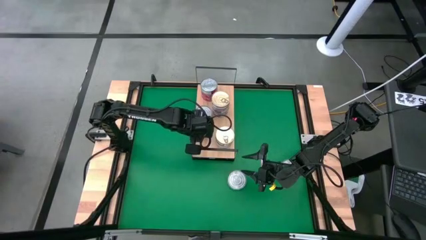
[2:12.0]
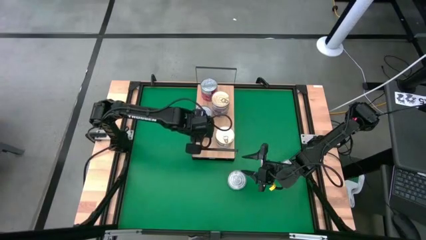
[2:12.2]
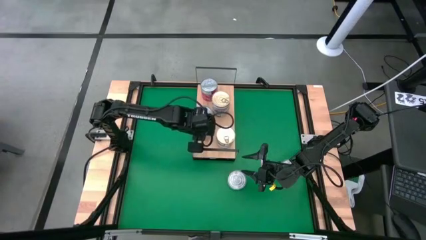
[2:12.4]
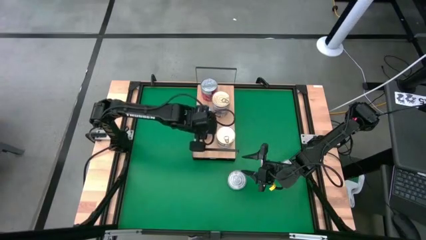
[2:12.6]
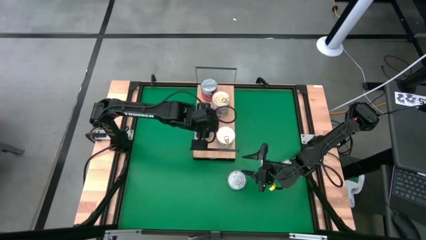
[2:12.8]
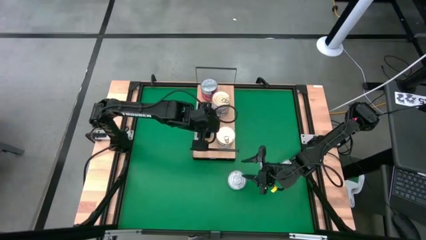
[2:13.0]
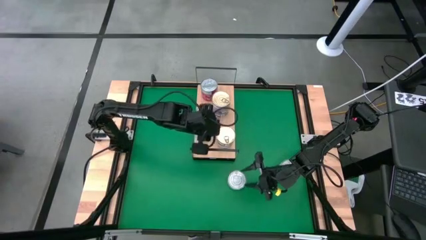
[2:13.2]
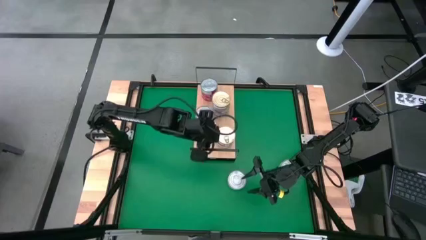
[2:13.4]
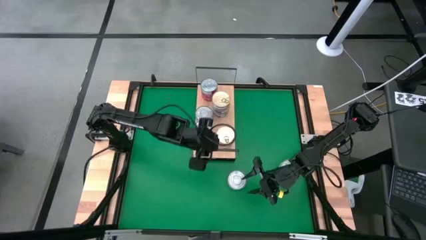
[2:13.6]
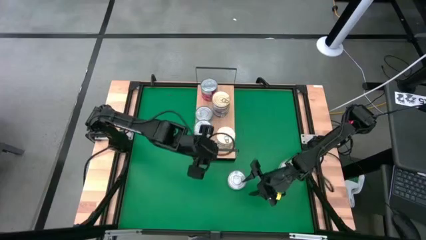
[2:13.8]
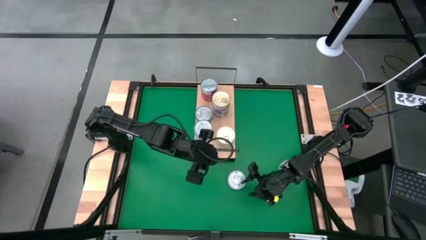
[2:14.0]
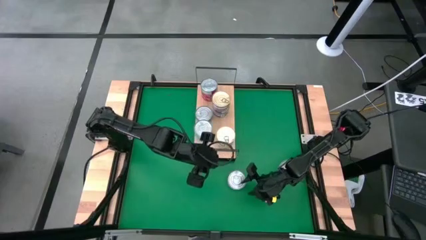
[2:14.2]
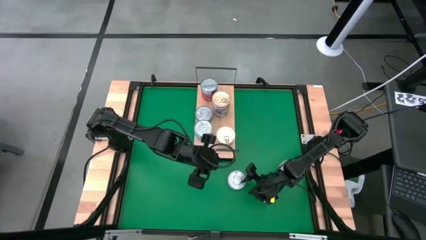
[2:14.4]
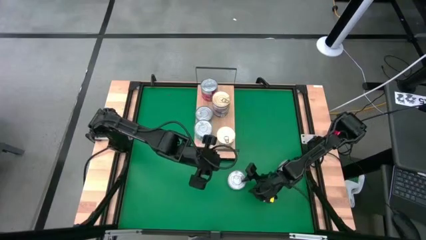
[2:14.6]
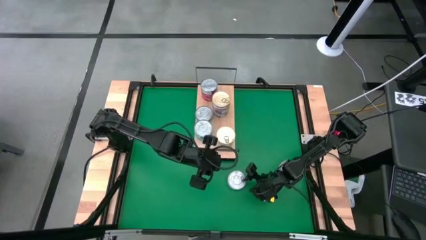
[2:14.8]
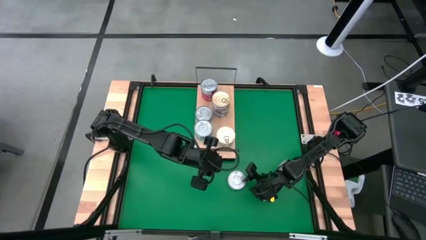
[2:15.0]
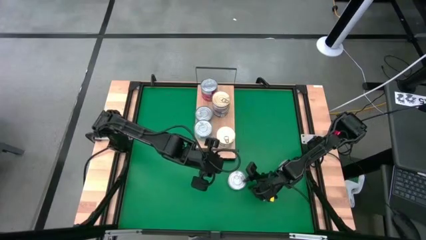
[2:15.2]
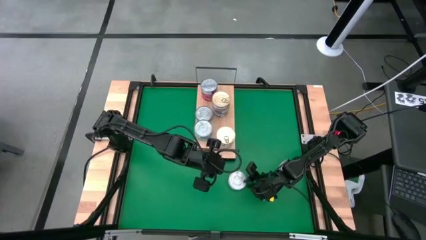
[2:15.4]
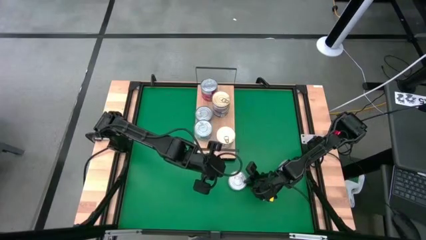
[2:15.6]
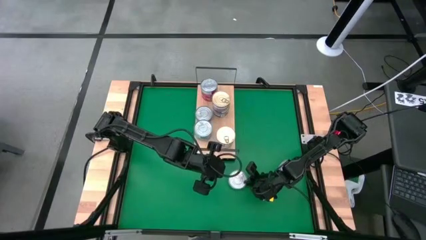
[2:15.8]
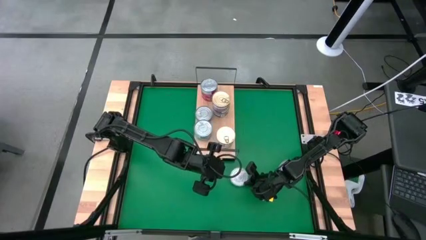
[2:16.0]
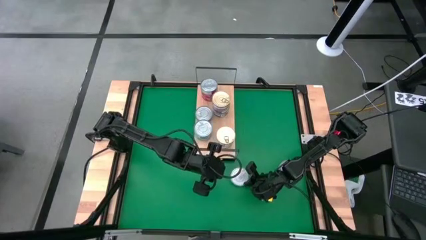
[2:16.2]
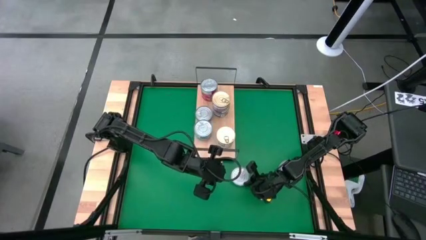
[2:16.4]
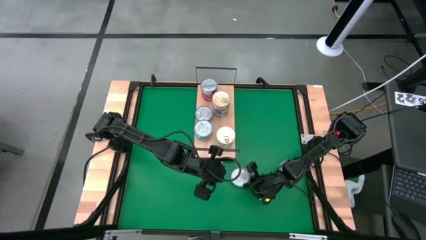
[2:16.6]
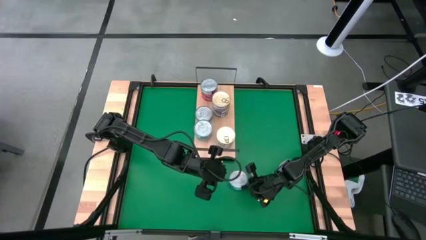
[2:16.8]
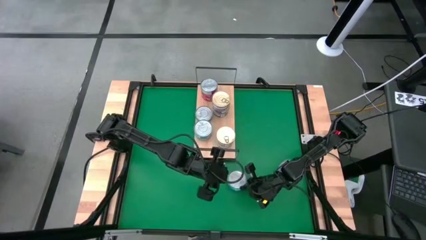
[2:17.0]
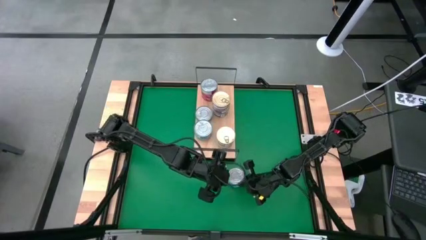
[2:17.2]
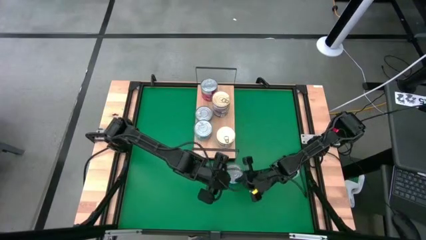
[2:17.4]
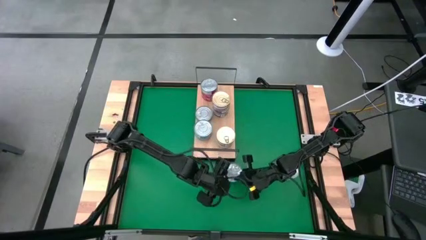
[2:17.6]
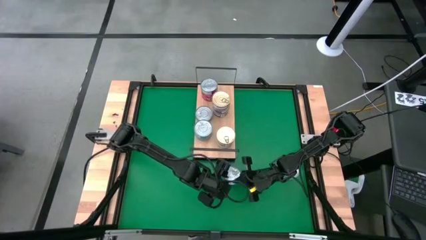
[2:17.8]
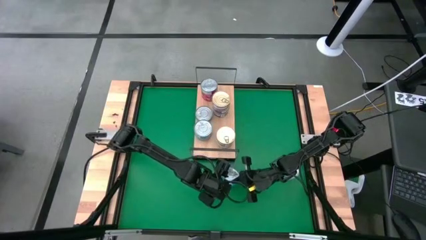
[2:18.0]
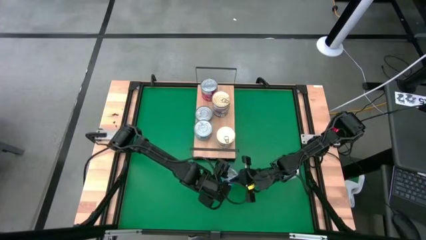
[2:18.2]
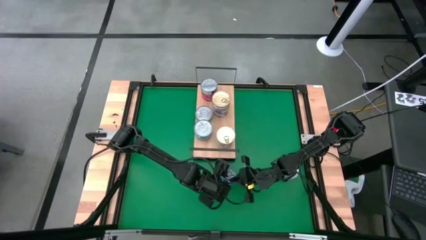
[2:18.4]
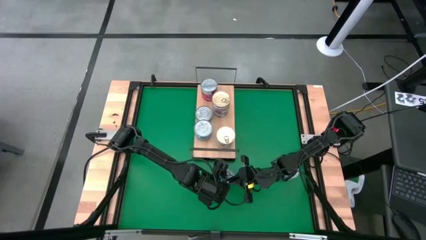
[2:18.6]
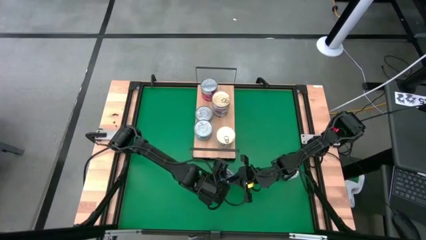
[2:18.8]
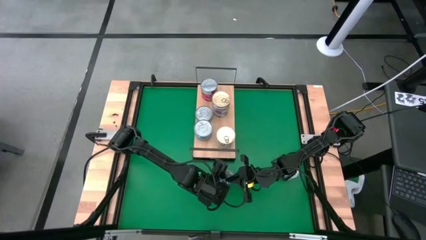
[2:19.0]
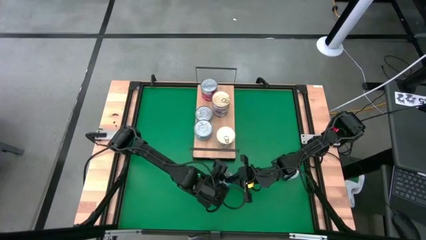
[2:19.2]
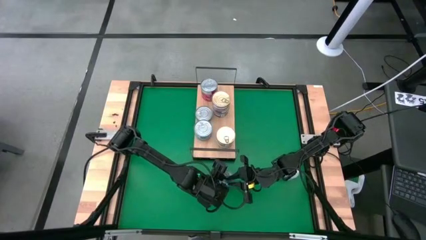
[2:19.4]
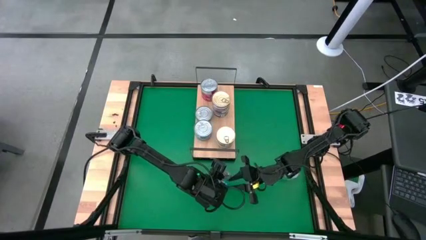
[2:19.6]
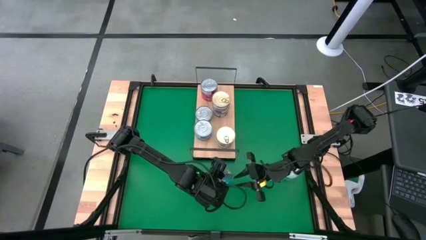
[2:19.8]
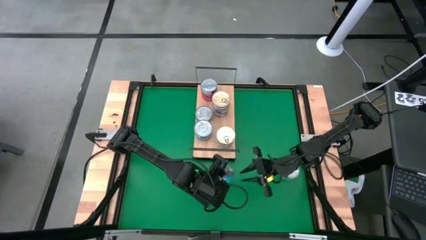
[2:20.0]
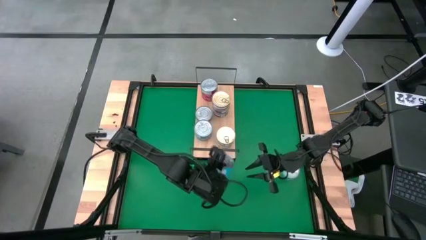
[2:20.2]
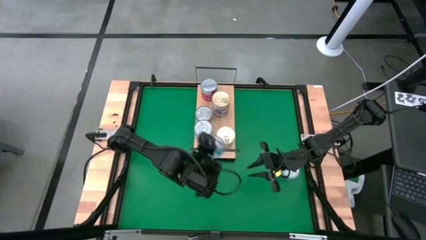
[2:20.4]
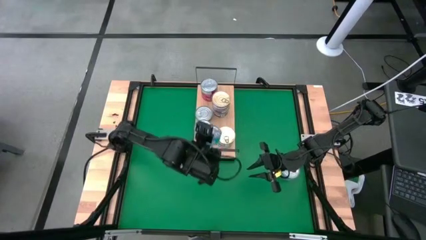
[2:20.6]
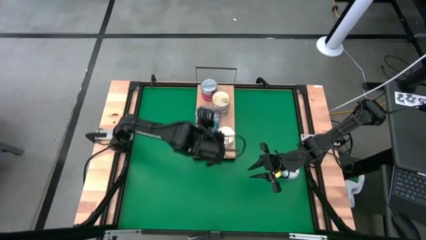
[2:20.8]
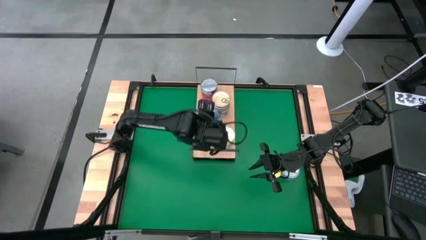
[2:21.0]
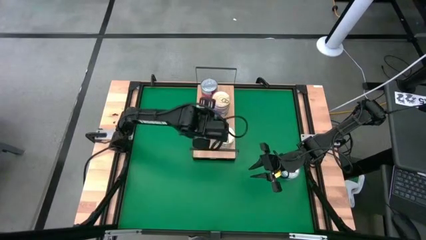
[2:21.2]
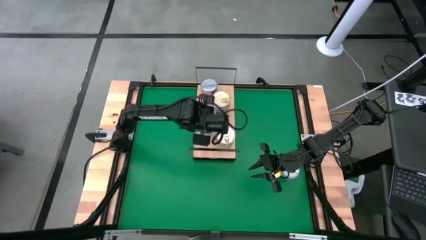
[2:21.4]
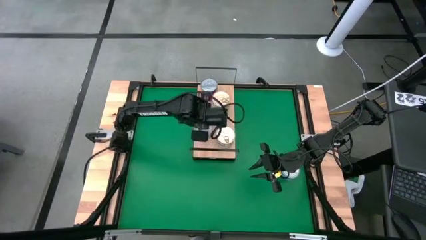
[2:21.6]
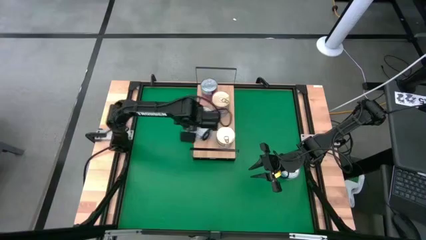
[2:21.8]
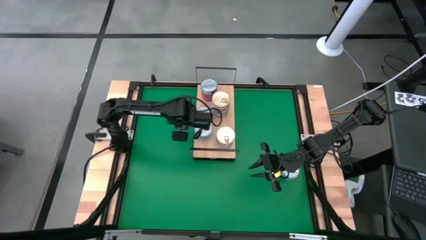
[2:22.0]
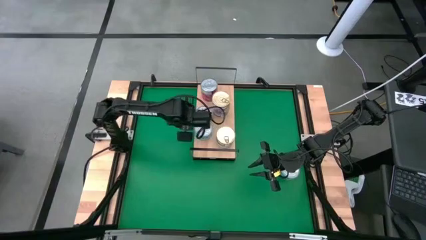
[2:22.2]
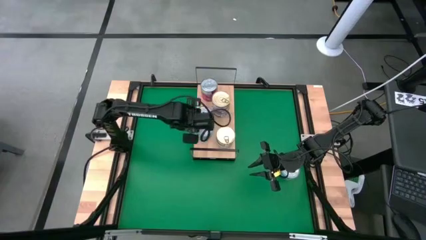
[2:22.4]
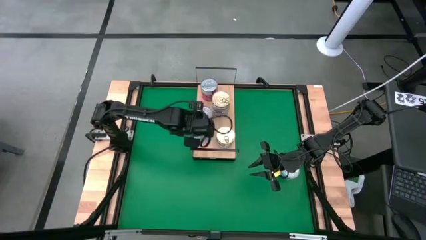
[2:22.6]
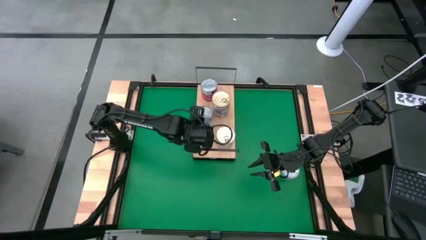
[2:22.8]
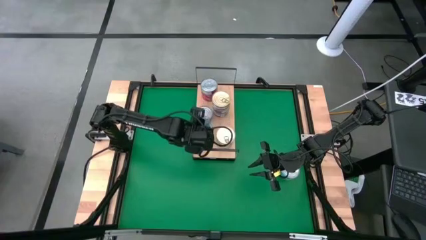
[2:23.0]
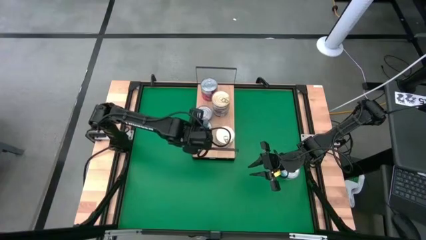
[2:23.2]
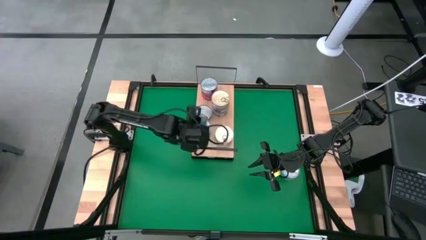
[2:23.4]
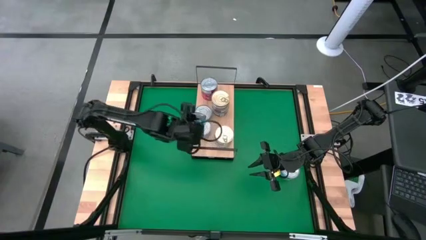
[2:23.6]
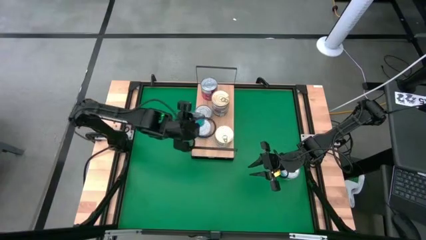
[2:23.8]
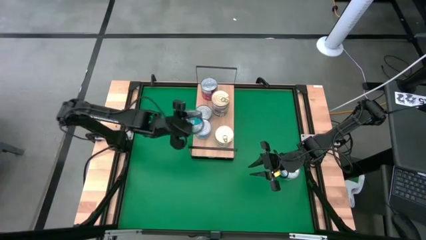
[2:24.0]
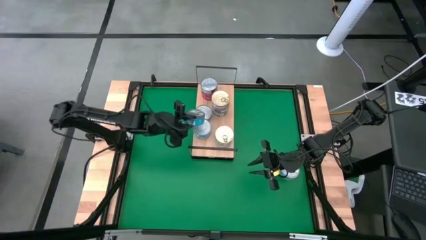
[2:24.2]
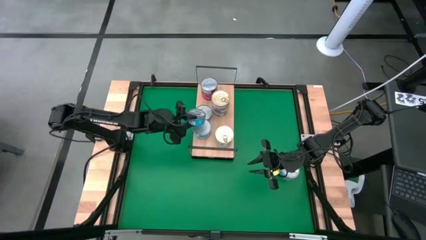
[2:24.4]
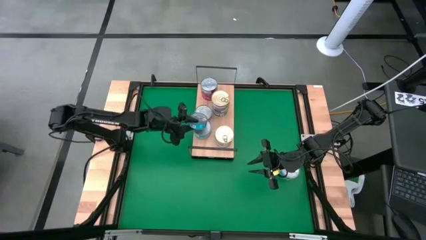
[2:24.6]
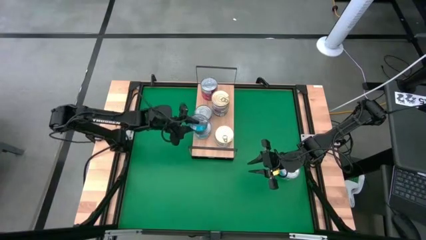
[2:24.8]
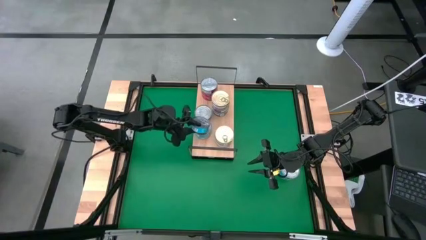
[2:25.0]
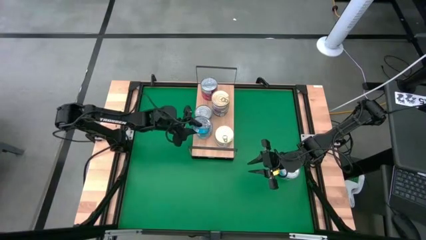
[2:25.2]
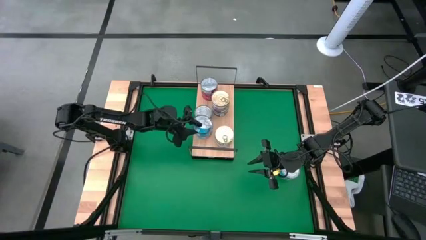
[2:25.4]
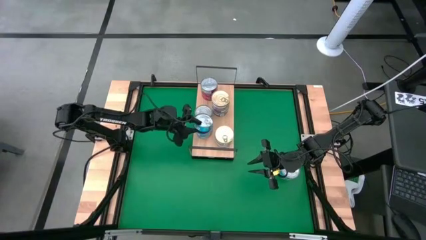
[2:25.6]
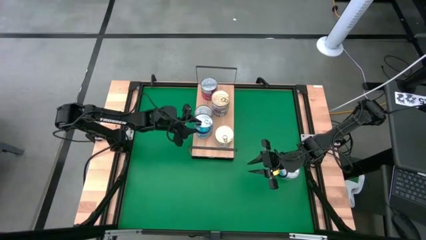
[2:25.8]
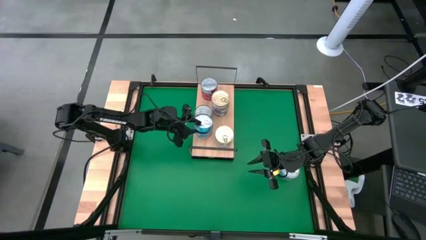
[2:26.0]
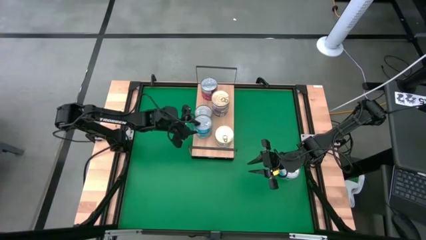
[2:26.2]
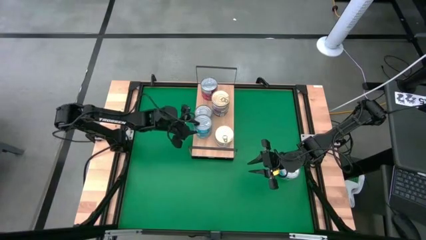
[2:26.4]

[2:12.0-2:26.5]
Task: Stack canned seafood by type on shelf
Stack the light blue tuna can on top of the light blue tuna can on the shelf
